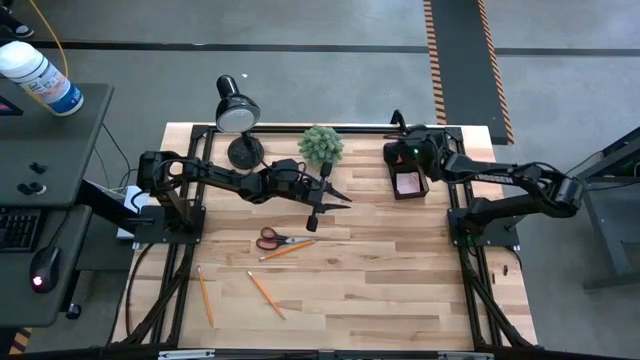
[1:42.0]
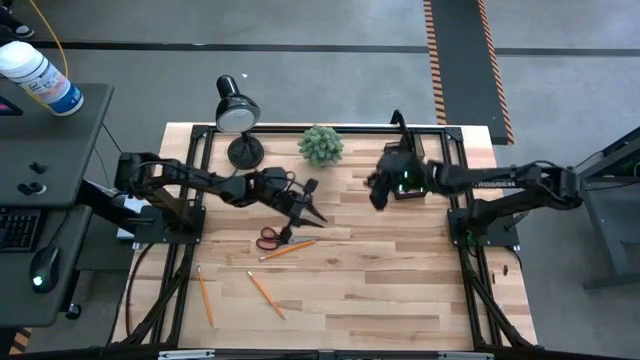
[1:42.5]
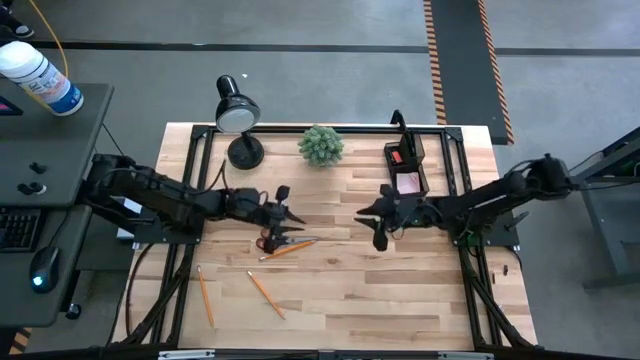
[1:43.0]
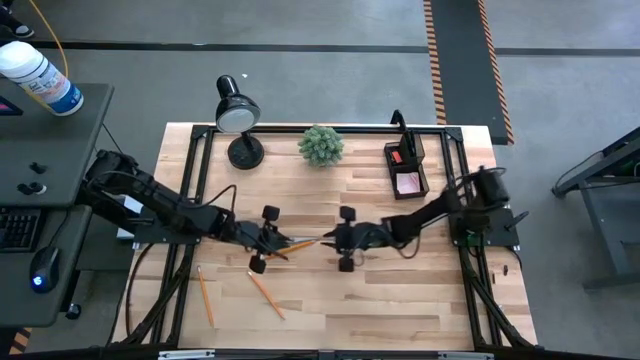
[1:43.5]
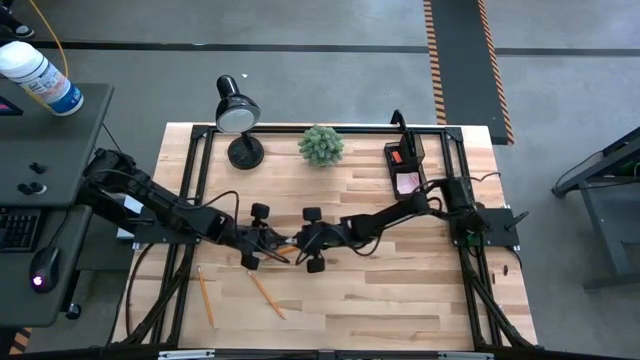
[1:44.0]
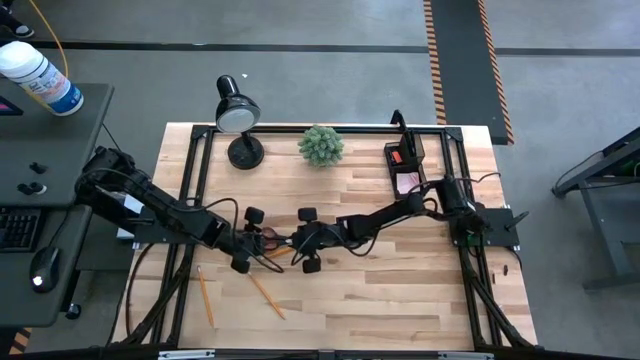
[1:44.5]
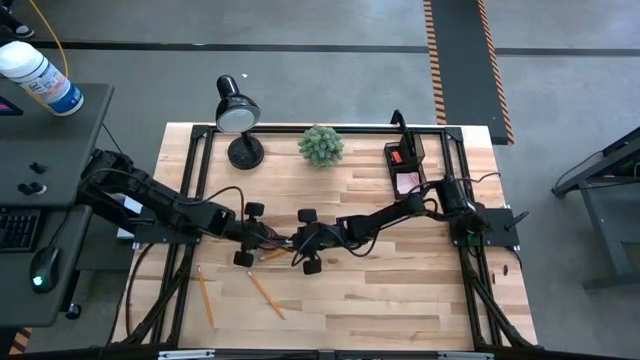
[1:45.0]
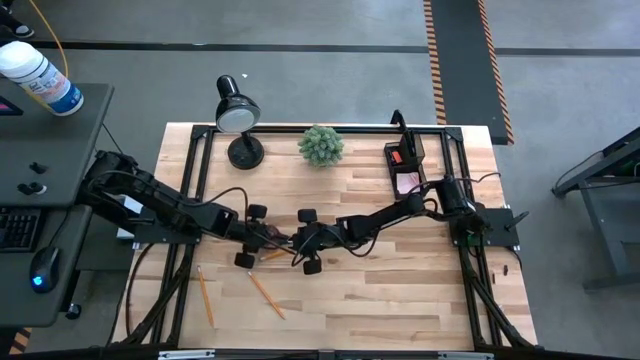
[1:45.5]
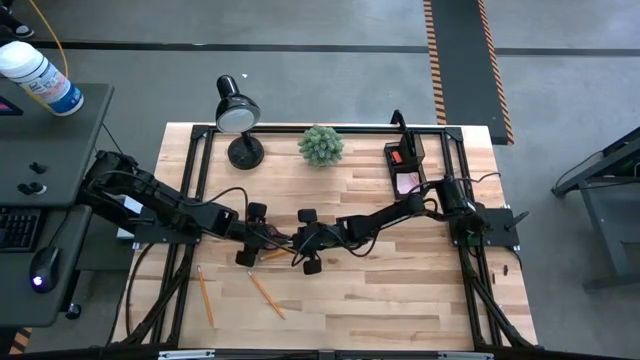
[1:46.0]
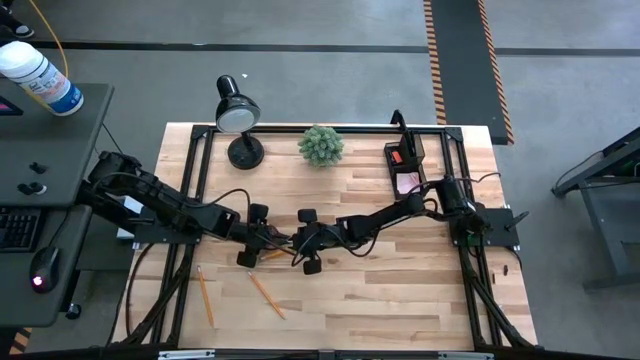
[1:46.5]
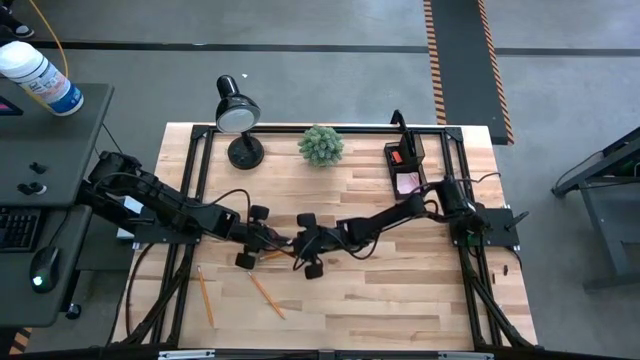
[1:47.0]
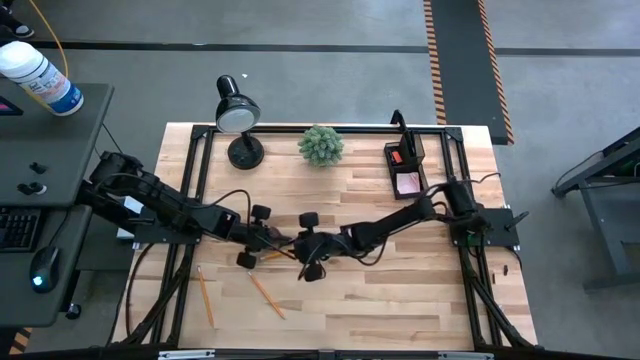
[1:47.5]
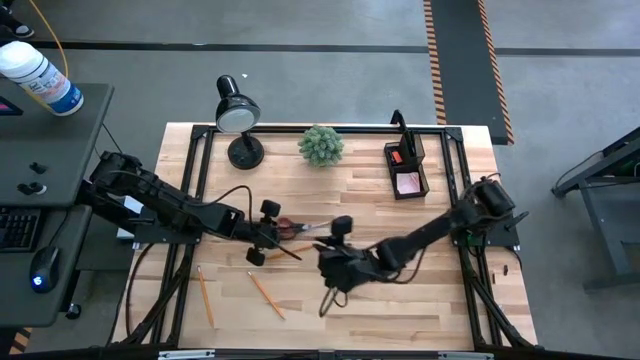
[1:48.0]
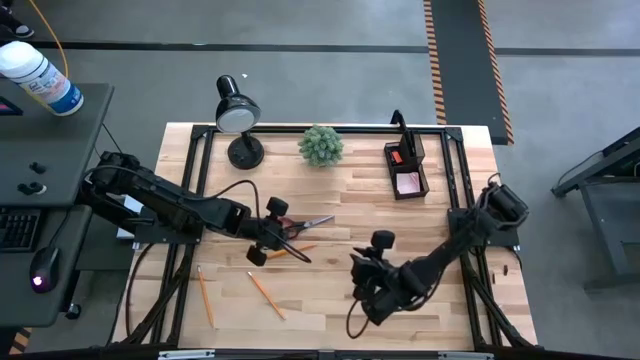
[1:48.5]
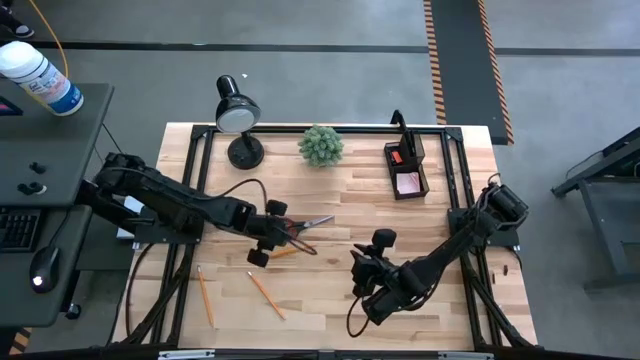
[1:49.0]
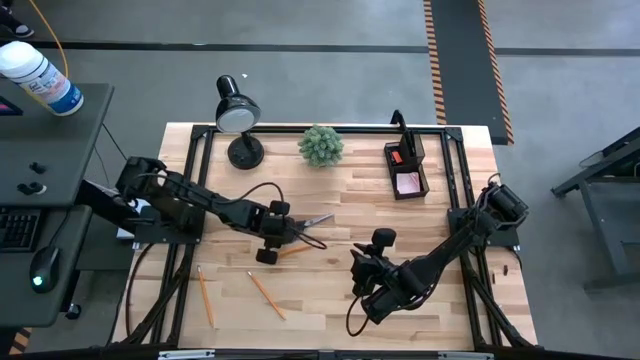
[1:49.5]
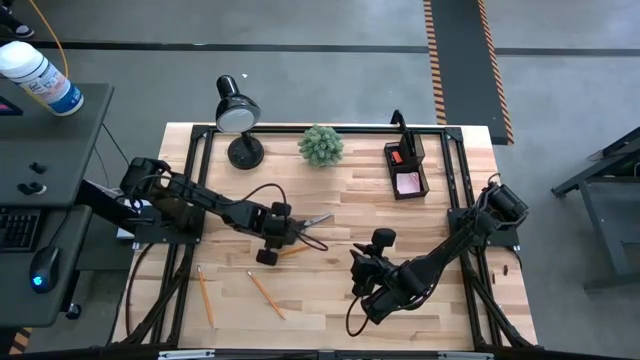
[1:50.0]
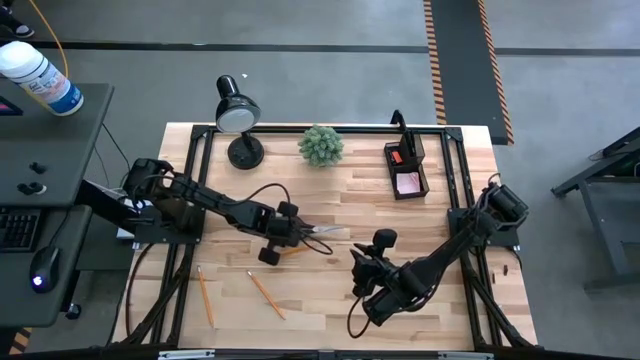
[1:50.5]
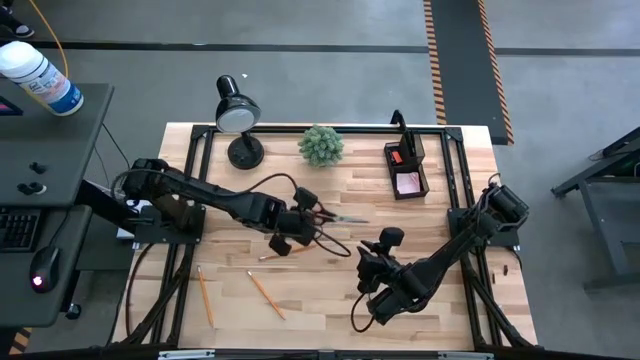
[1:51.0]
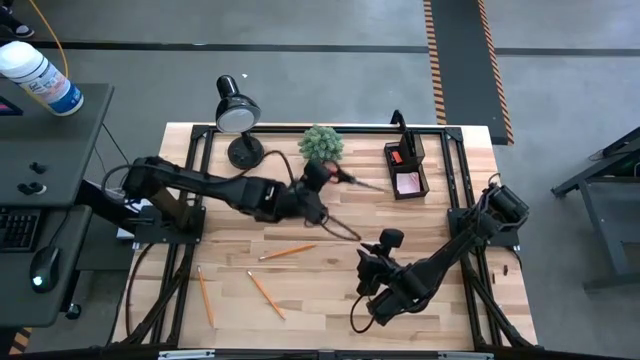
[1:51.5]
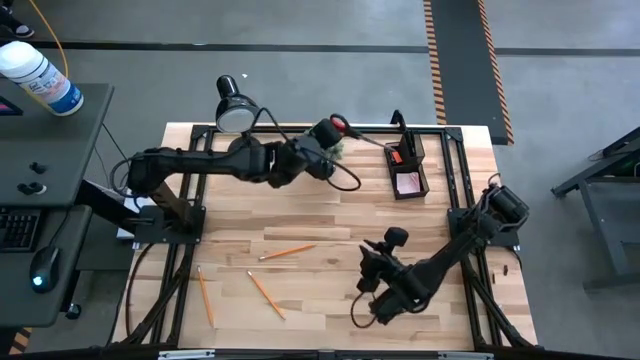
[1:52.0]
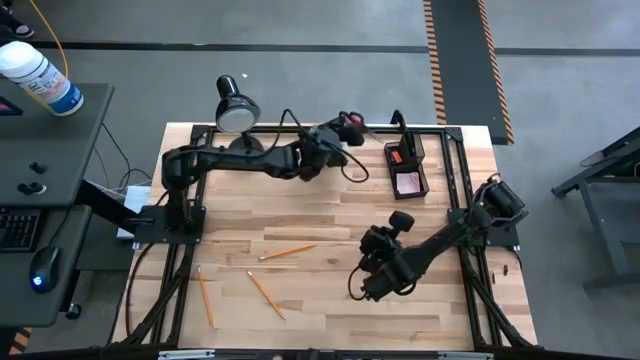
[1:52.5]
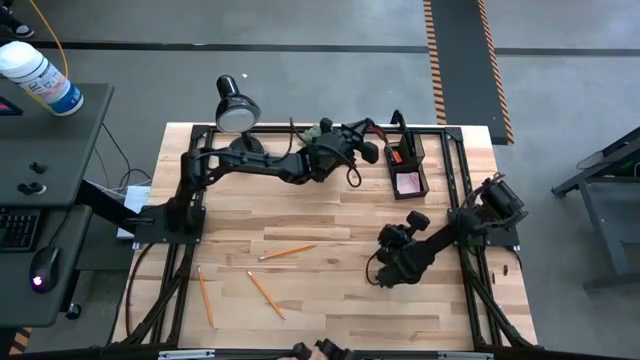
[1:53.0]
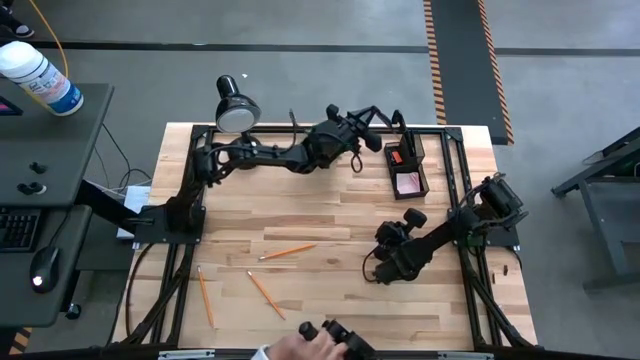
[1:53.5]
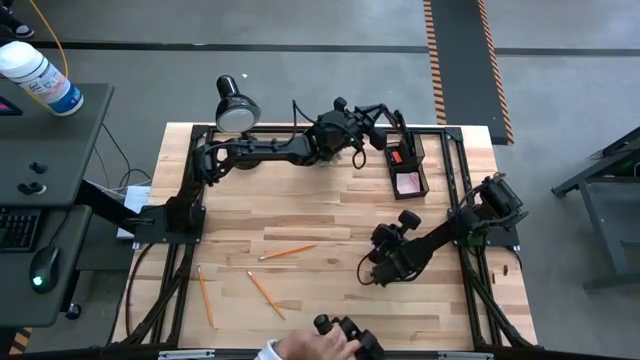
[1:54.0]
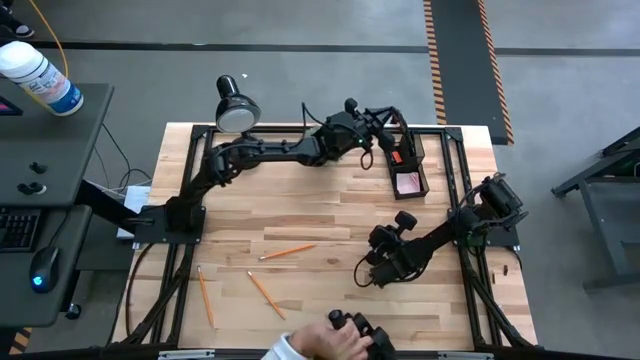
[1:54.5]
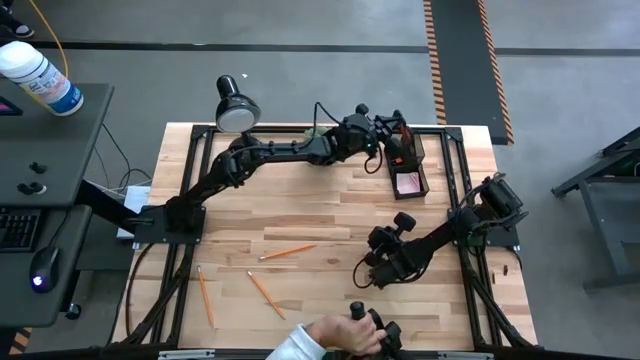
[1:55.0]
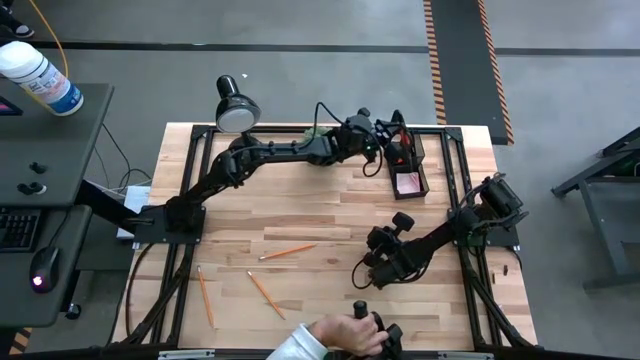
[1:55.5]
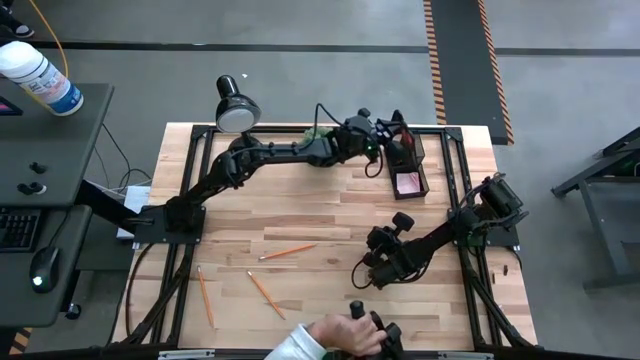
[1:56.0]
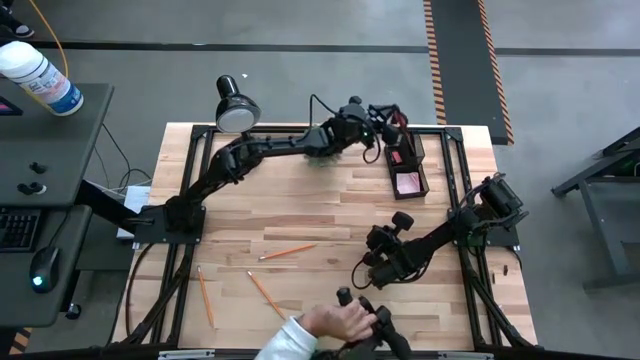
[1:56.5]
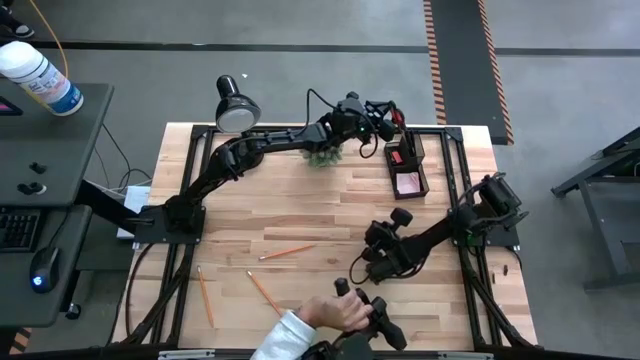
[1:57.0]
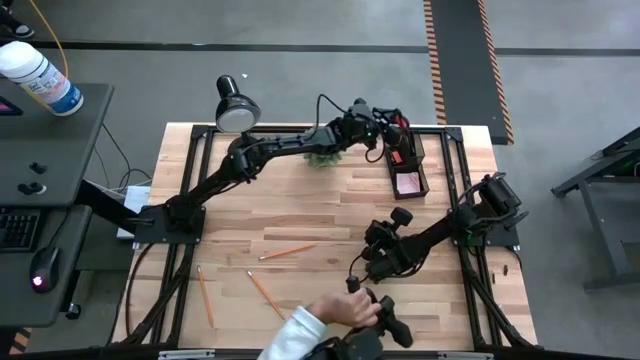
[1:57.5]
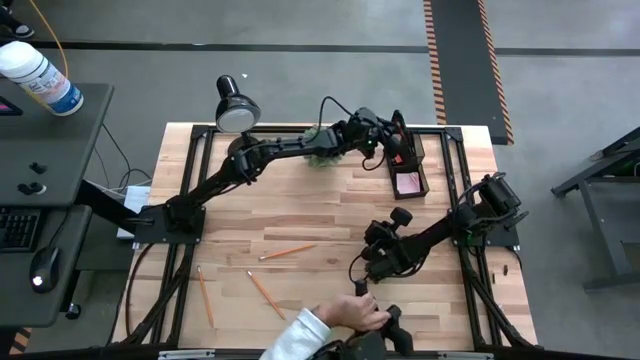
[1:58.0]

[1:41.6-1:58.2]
Task: Pick and place office supplies into organizer
Put the scissors into the desk organizer

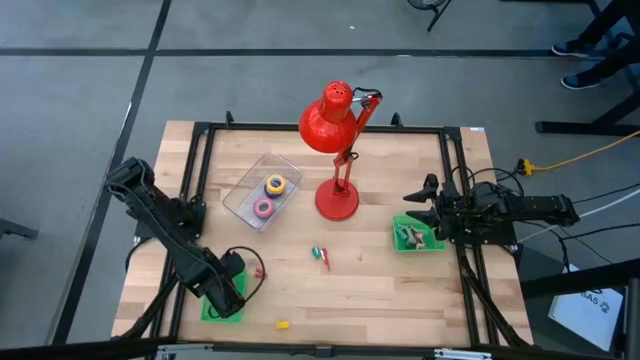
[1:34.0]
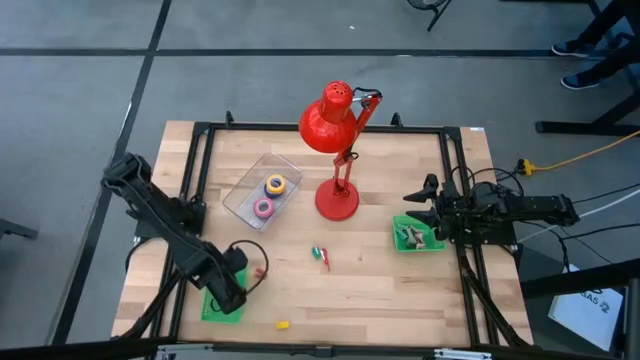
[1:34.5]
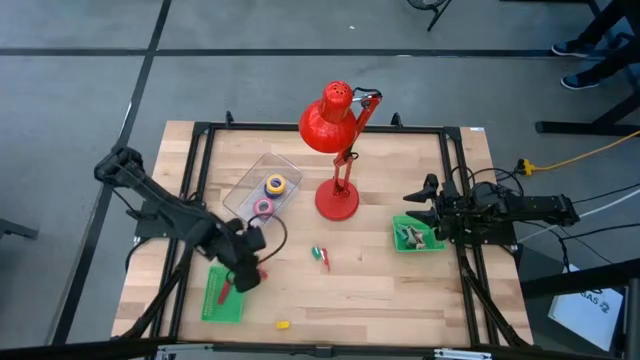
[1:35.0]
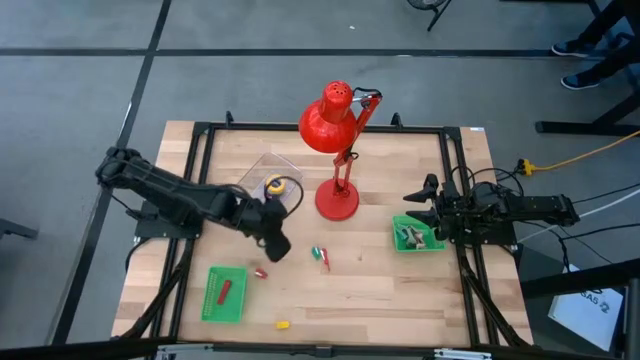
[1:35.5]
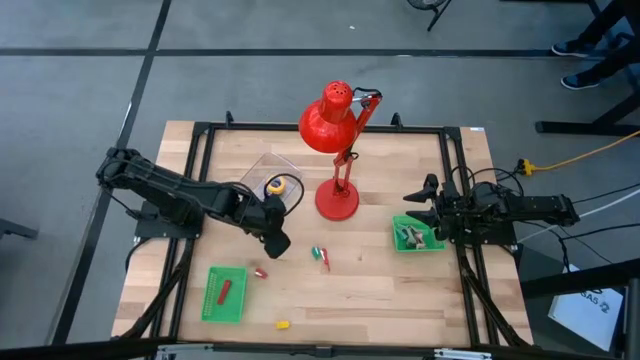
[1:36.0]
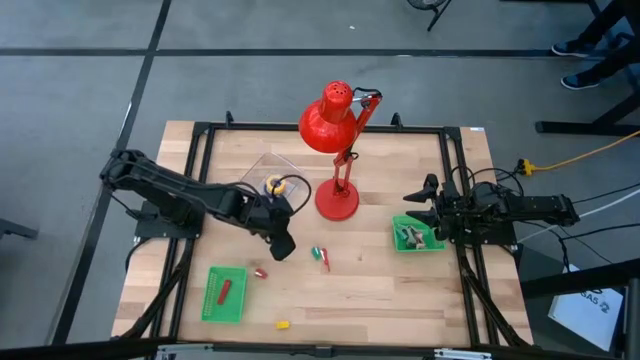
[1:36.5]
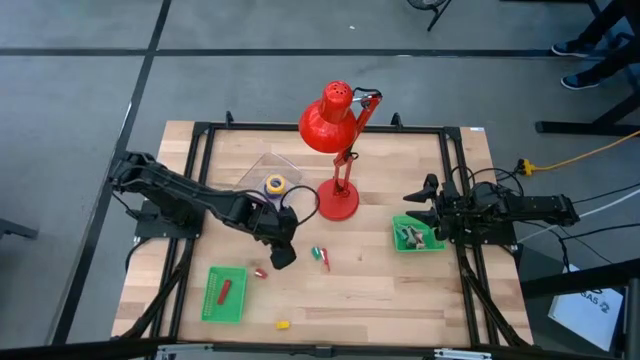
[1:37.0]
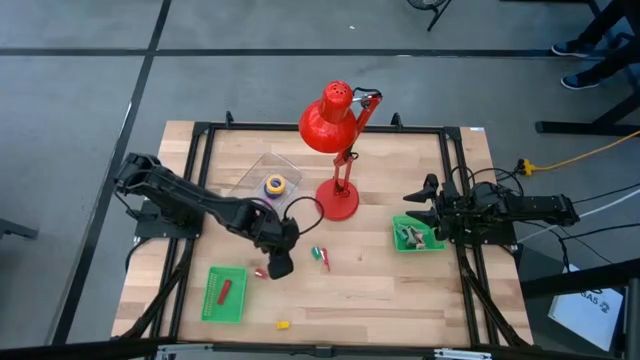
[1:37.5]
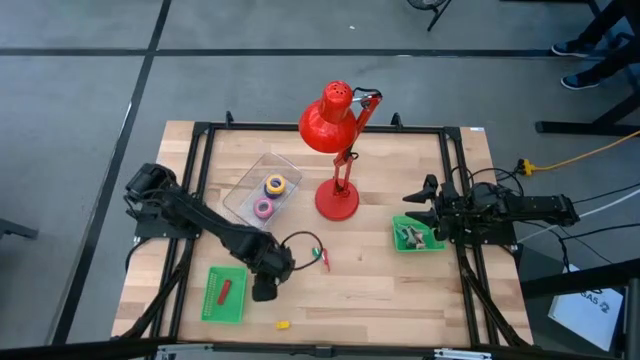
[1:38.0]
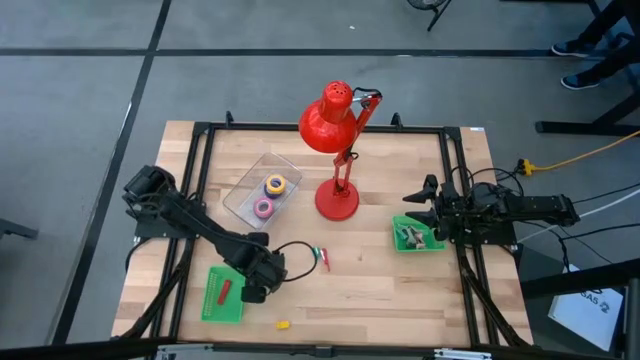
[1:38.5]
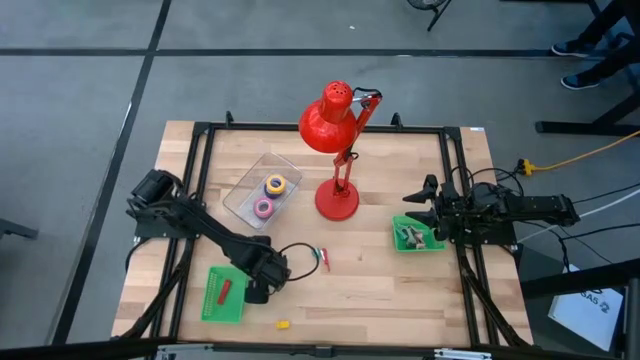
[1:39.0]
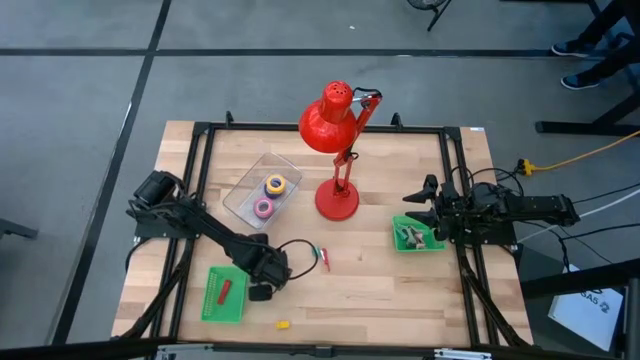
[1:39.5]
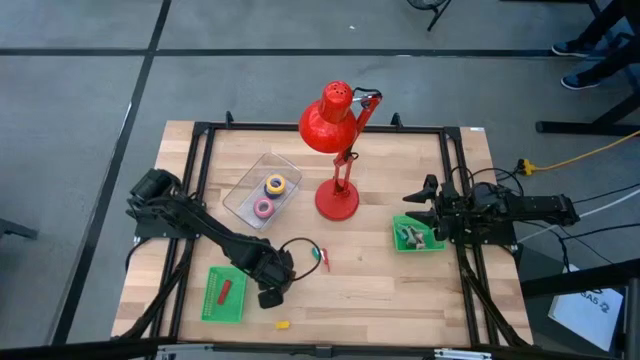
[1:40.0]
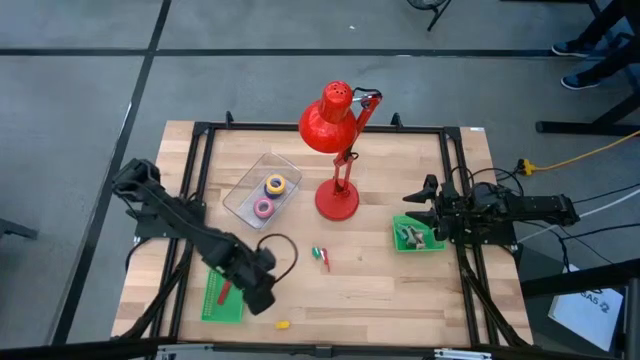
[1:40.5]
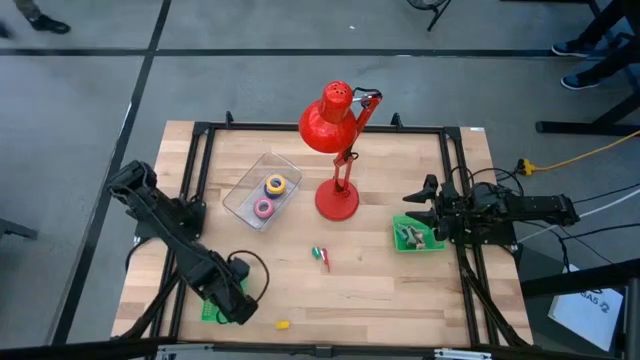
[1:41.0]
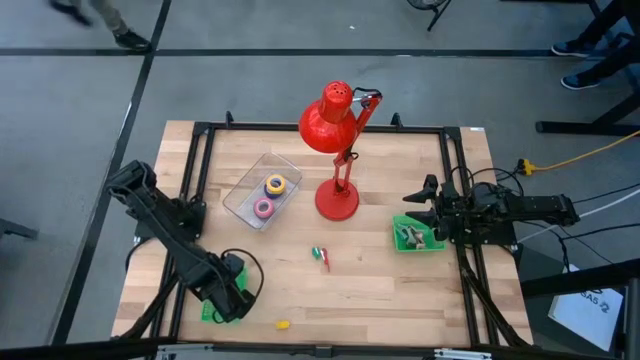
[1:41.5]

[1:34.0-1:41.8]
Task: Pick and place Stapler, Stapler remover, tape
Put the bottom red stapler into the bottom green basket
